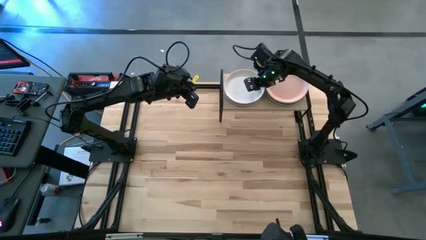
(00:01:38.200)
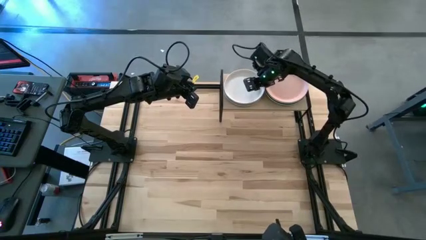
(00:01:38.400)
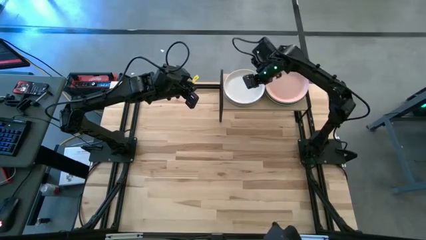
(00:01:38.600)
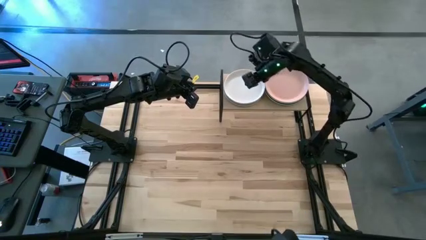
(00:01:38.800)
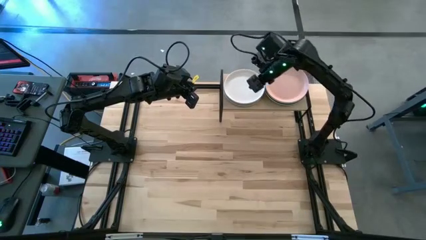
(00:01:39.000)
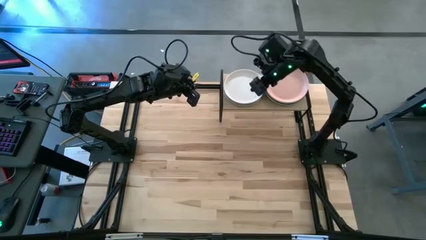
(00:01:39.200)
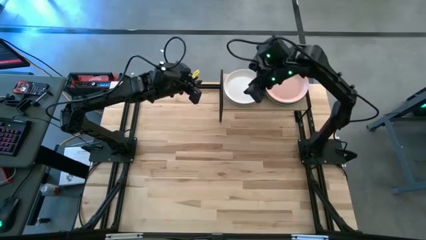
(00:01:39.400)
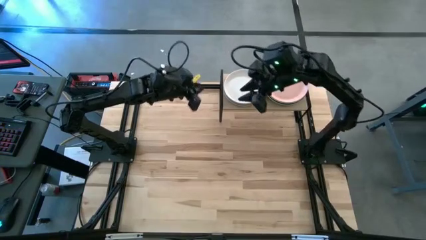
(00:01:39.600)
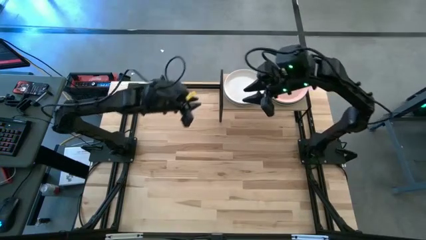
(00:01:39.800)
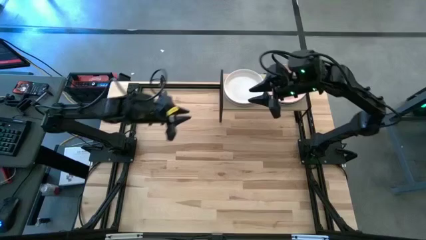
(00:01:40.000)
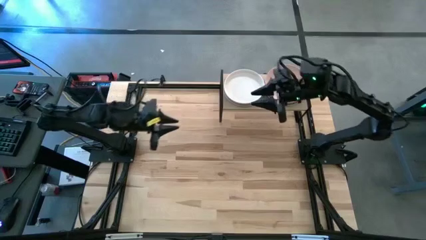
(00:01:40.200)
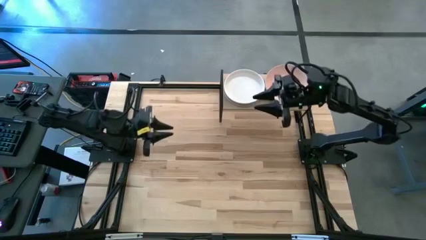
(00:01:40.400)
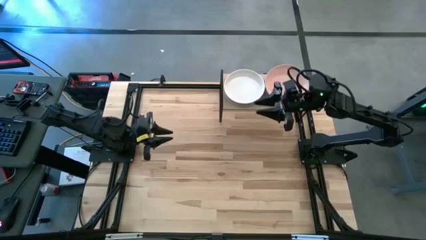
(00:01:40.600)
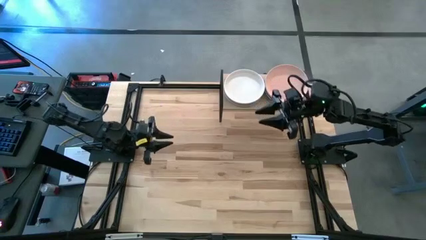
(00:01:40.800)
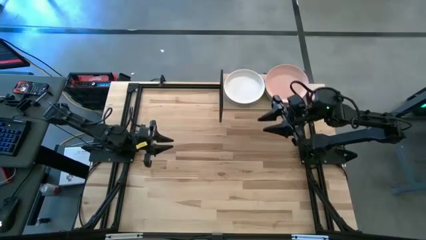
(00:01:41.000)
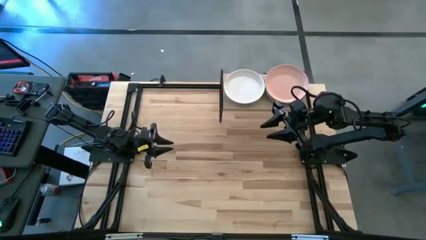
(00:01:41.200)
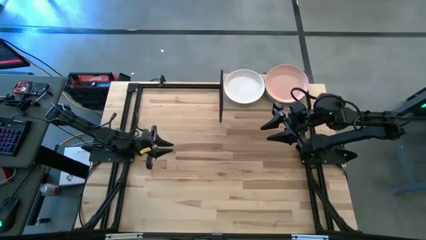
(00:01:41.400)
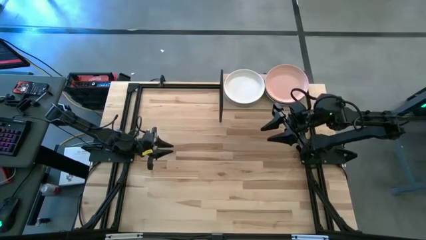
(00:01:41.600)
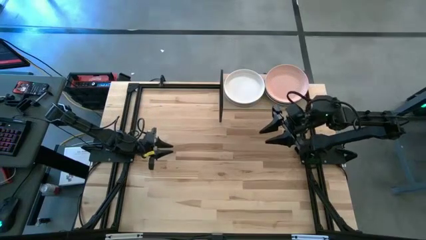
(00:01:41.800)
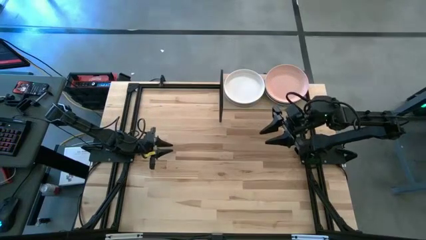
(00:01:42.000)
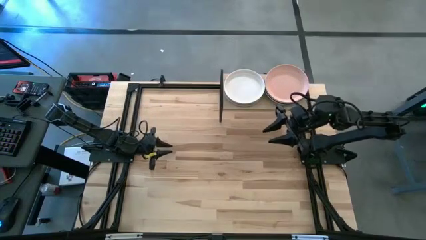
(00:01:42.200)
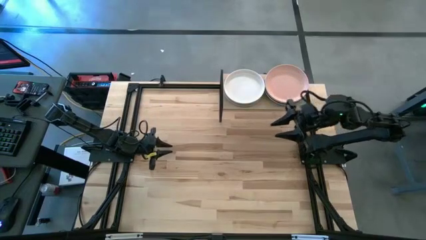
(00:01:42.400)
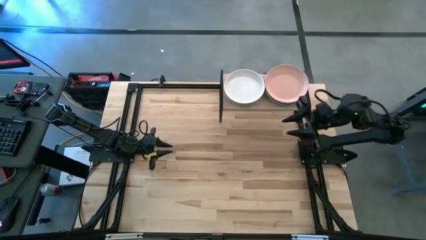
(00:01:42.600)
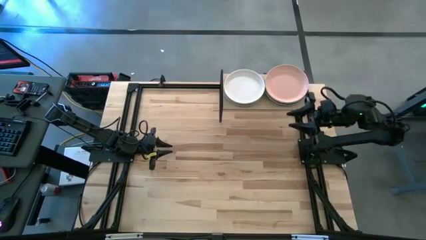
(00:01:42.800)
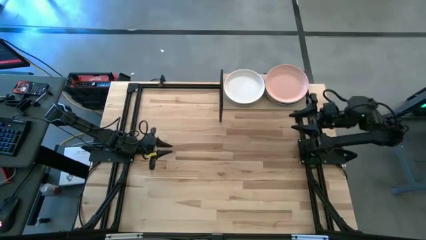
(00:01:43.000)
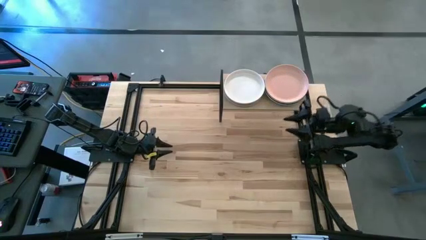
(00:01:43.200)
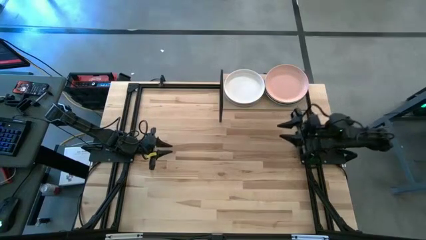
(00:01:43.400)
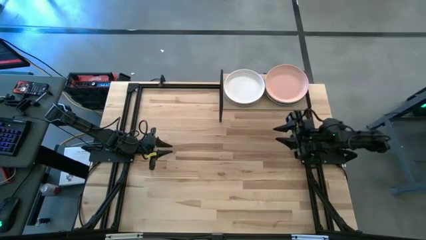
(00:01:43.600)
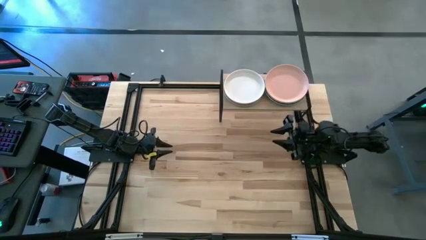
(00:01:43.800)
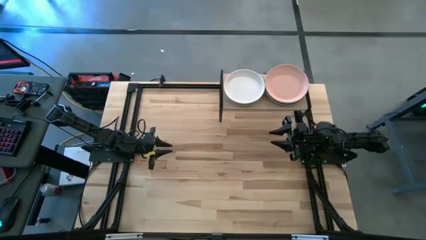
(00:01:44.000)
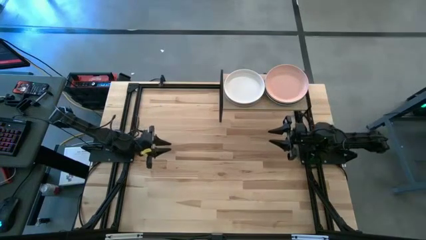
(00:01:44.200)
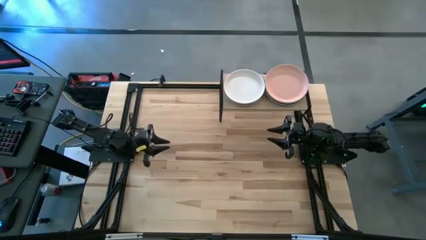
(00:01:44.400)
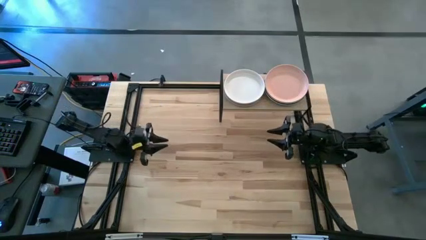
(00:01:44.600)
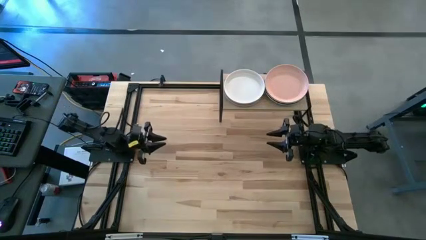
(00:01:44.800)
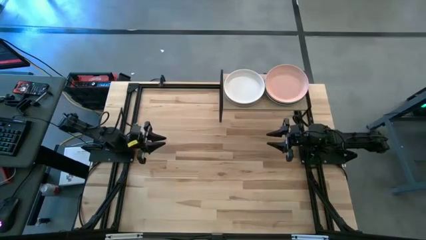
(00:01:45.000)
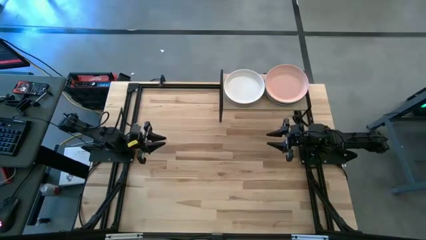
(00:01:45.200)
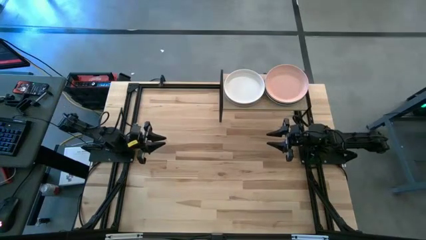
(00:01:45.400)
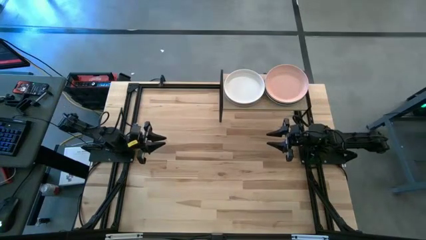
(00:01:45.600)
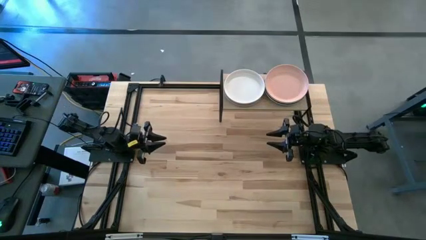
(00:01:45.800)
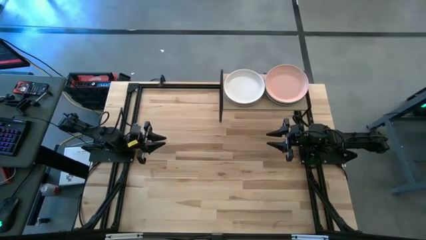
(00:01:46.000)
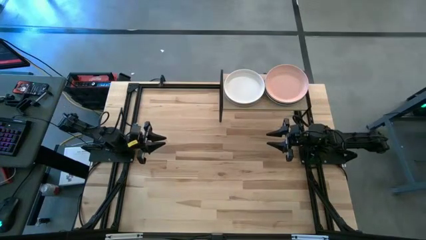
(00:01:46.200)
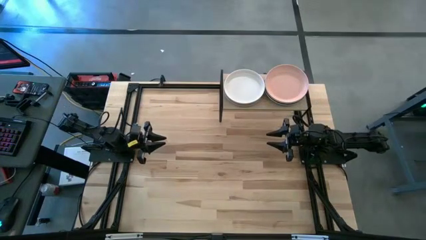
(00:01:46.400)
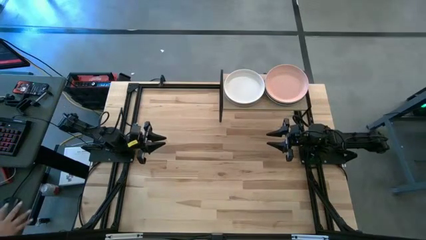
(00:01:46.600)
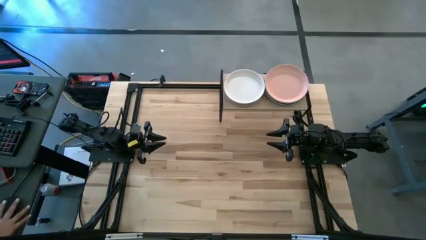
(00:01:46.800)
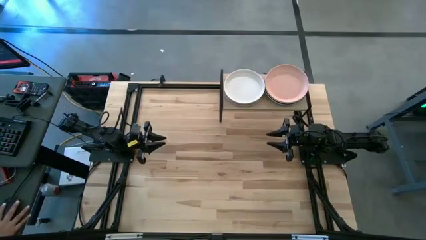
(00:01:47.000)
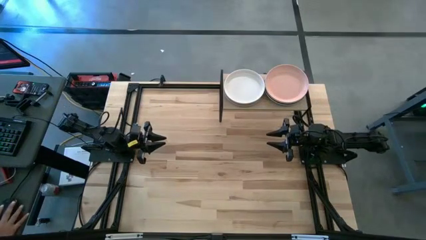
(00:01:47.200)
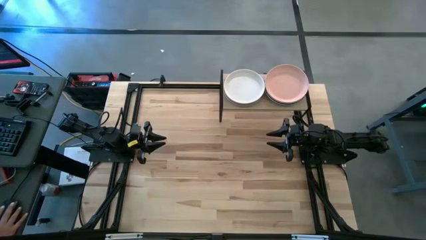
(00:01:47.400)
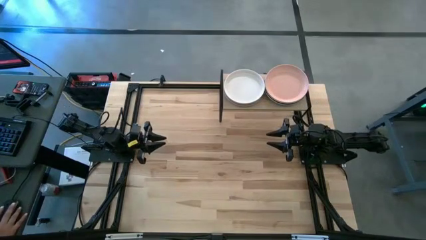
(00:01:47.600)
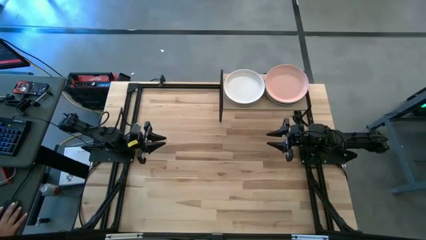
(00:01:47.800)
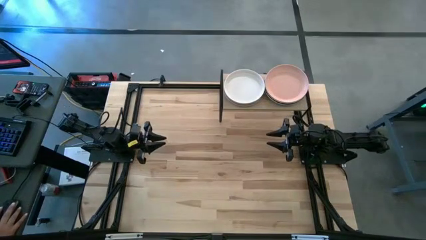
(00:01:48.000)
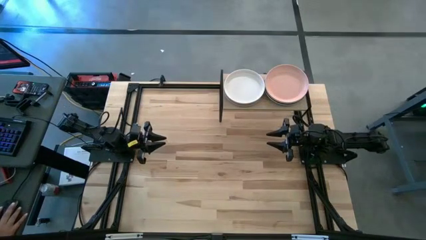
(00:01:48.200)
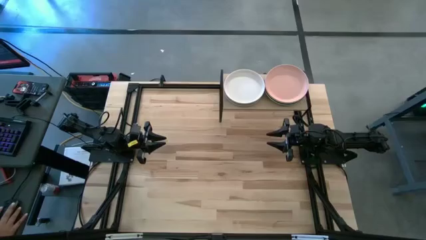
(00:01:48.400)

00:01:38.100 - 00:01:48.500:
Task: Place and stack plates onto a shelf
Return to Home Position

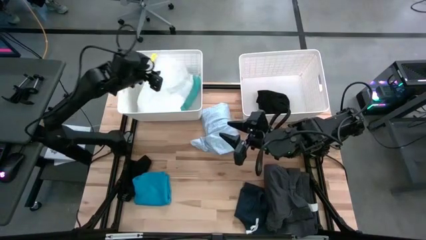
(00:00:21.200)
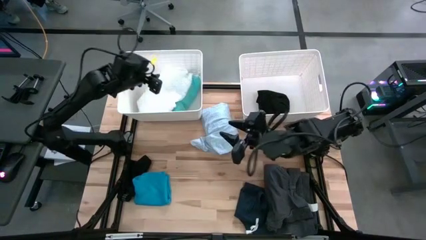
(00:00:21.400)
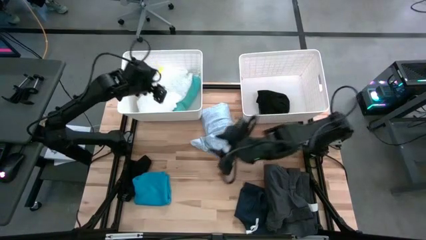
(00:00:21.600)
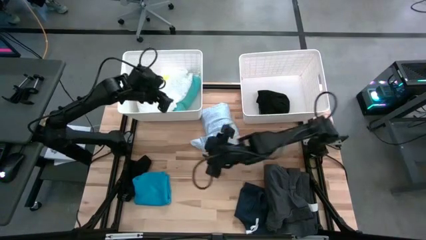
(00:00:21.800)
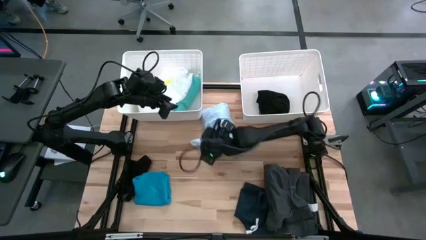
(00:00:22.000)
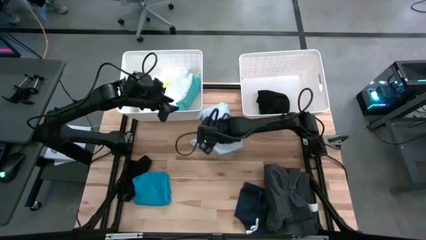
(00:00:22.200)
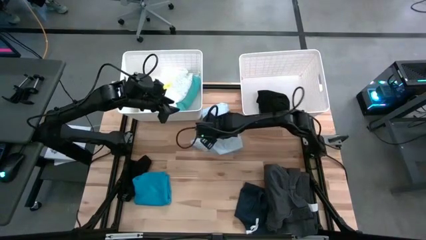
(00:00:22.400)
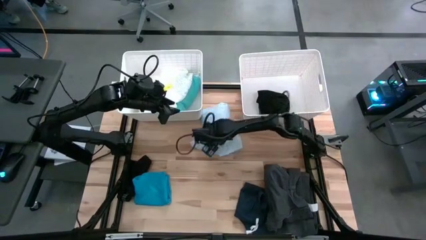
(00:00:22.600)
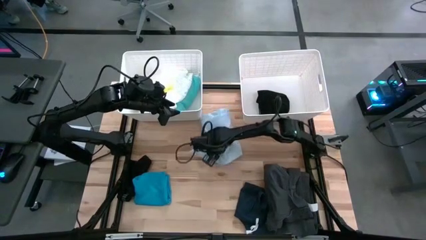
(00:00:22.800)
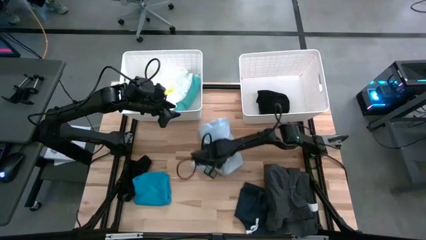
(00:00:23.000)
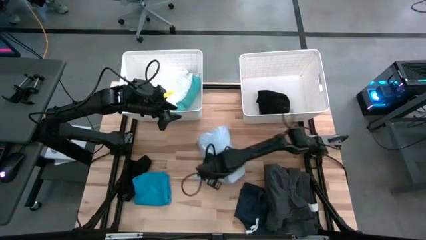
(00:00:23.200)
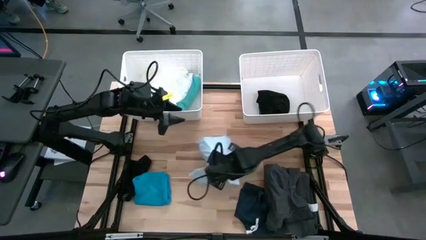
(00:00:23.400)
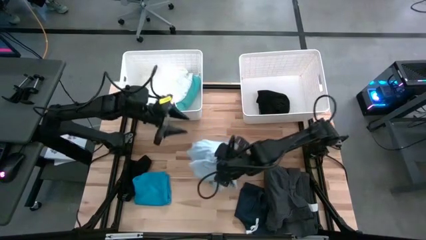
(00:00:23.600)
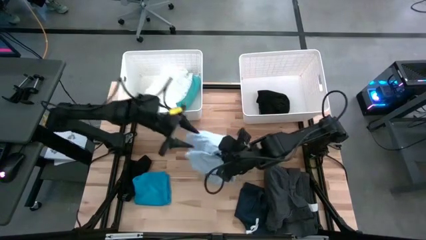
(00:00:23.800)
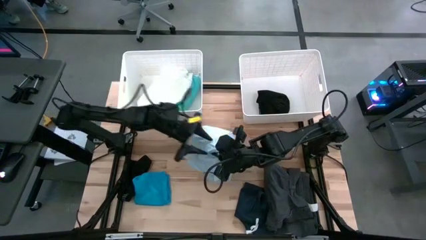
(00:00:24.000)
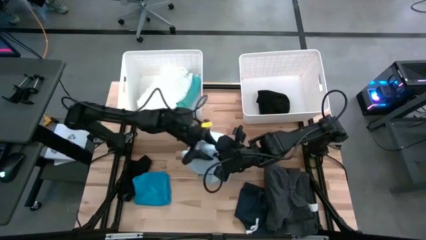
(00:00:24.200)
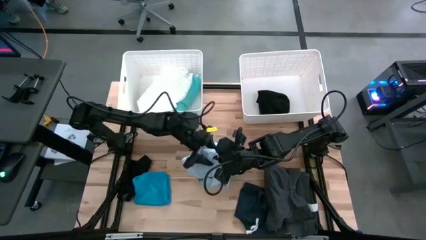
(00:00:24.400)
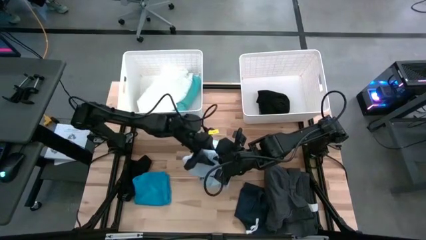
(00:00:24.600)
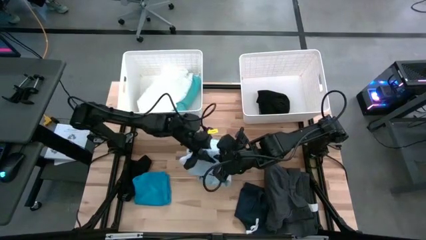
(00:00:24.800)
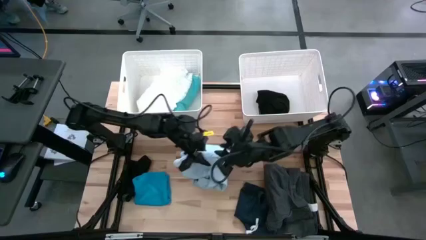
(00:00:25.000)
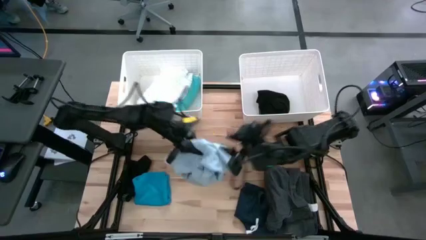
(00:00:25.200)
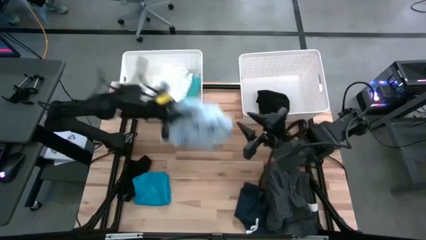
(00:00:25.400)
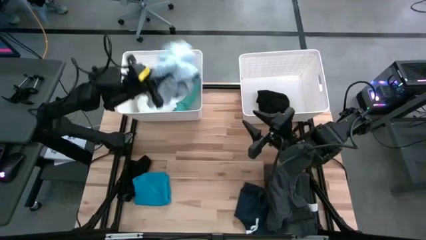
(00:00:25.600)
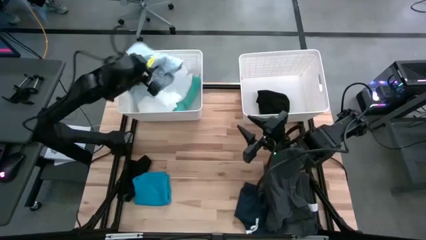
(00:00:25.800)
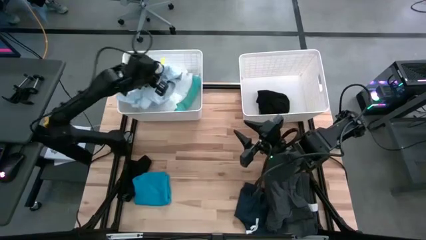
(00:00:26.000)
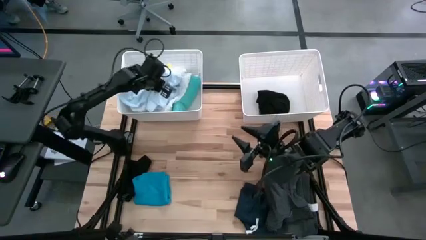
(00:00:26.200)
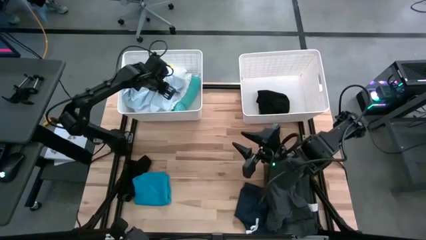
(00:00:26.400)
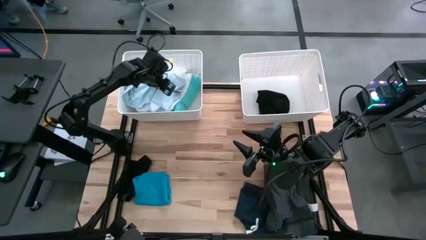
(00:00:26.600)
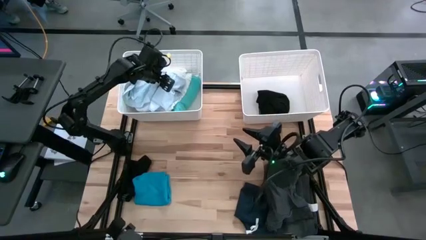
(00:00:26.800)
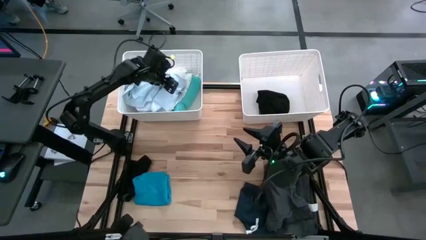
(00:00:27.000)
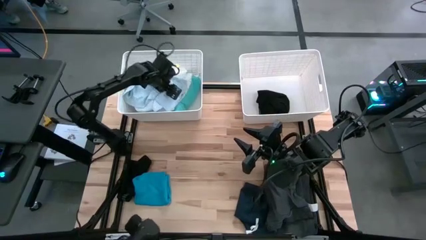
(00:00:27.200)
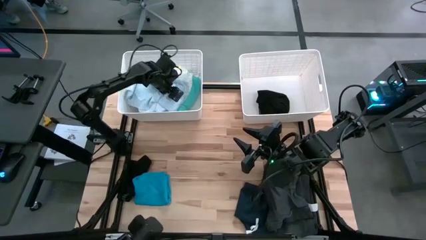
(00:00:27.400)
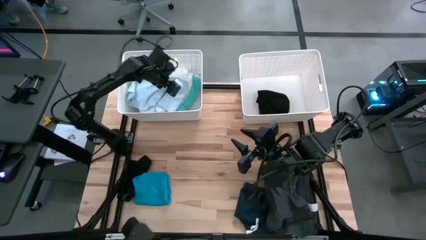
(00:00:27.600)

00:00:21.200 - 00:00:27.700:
Task: Sort clothes
Put the light blue shirt into the left white bin
